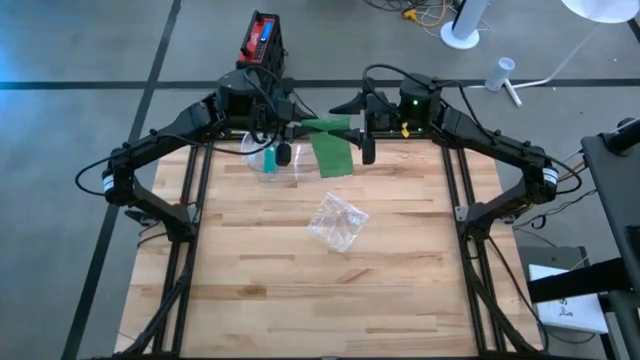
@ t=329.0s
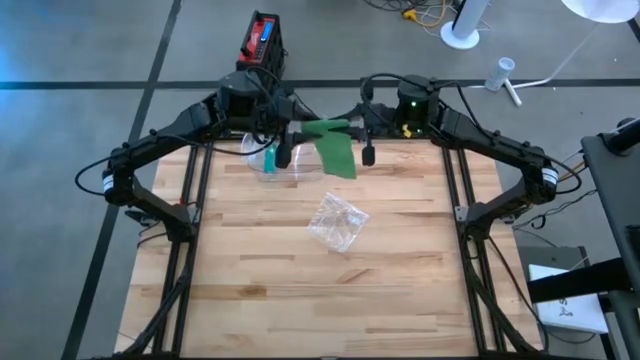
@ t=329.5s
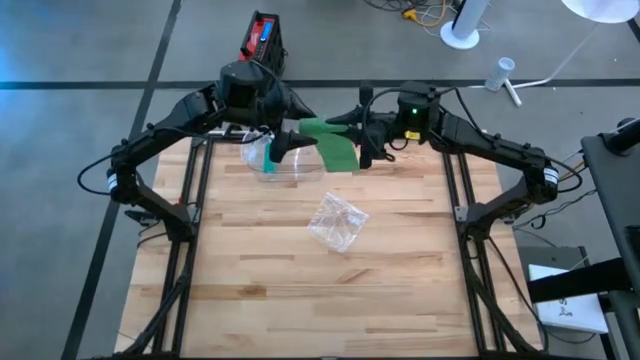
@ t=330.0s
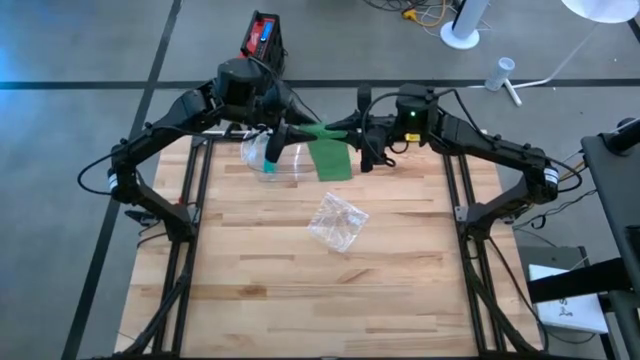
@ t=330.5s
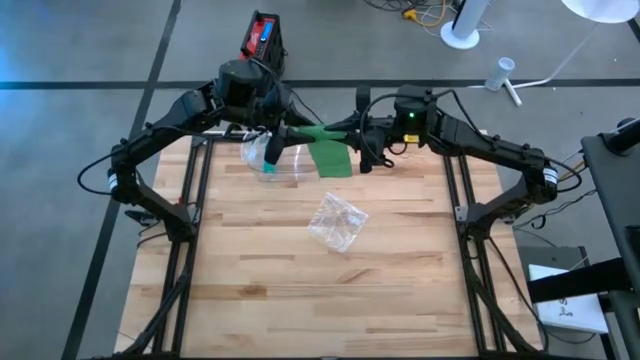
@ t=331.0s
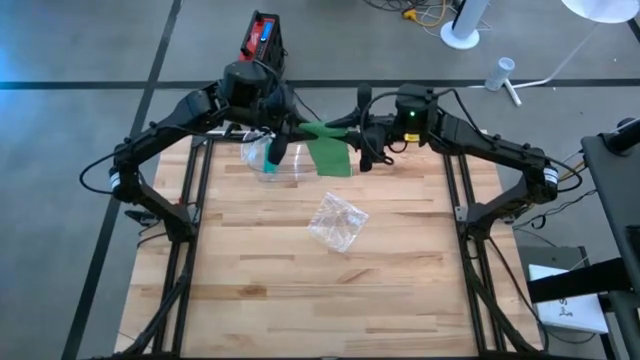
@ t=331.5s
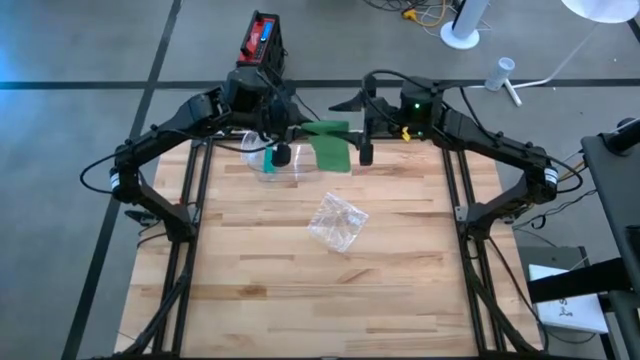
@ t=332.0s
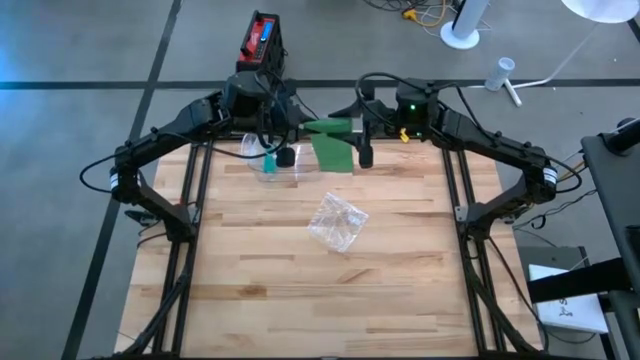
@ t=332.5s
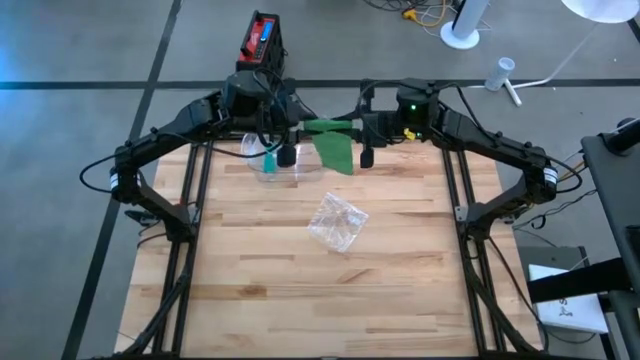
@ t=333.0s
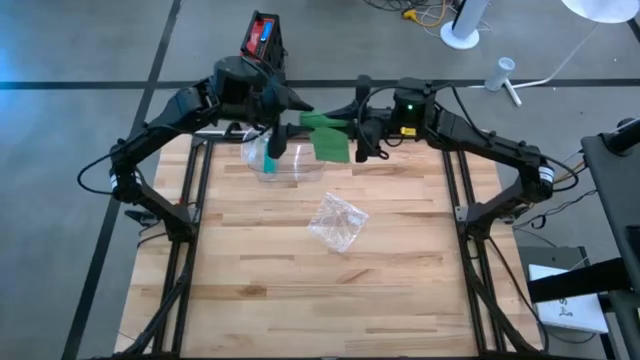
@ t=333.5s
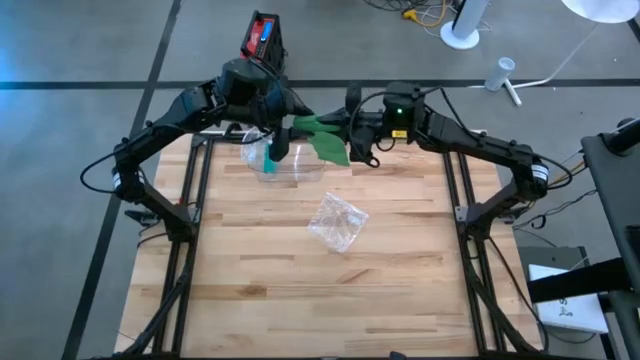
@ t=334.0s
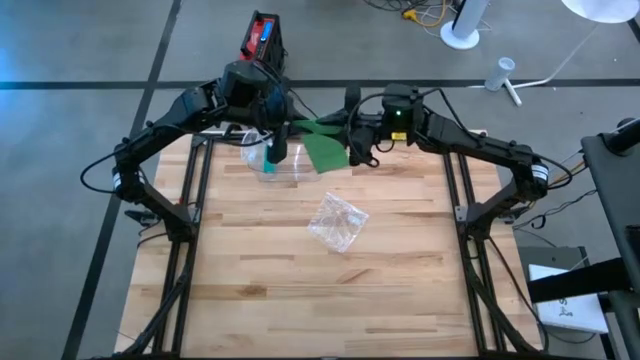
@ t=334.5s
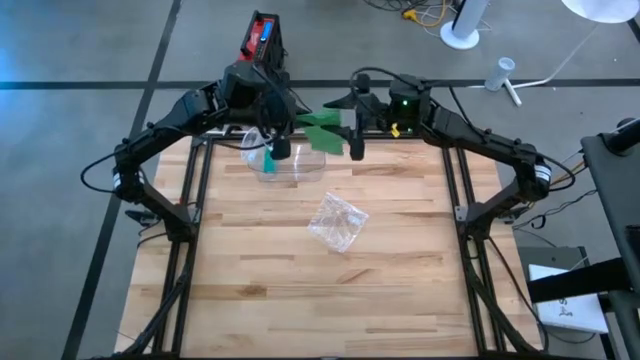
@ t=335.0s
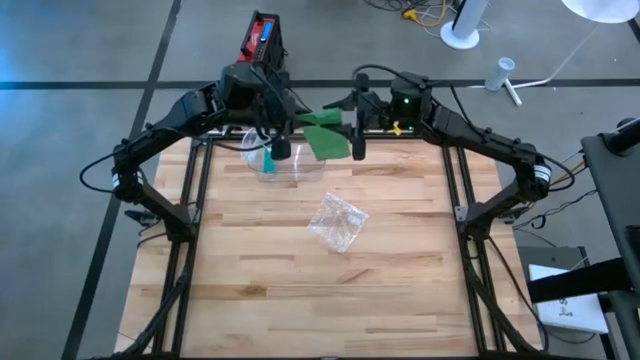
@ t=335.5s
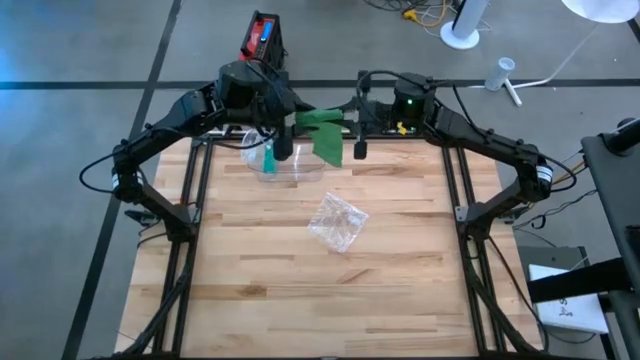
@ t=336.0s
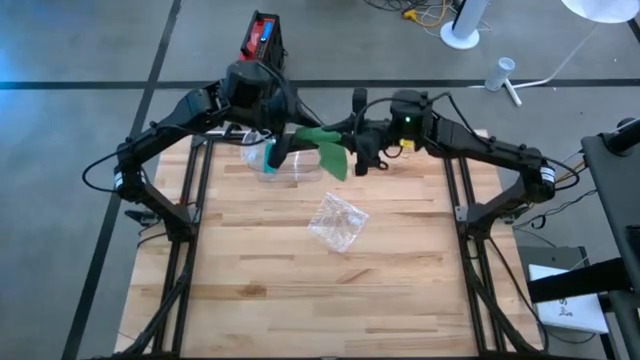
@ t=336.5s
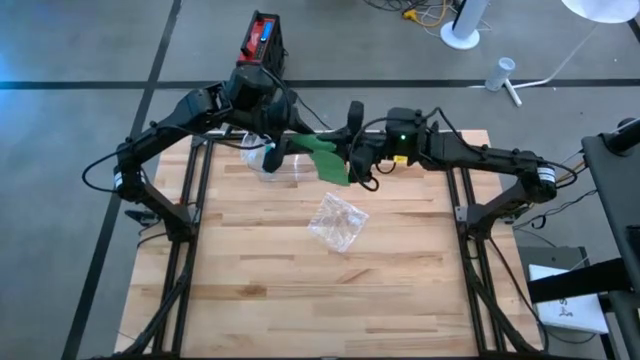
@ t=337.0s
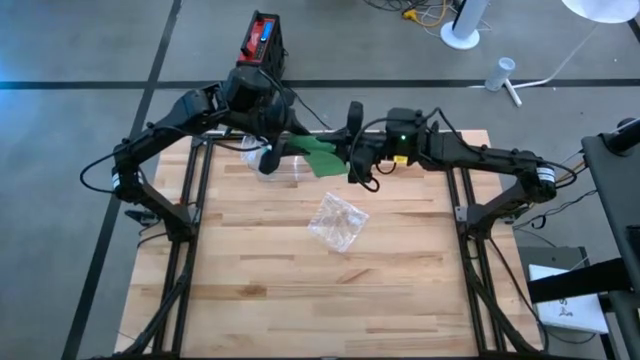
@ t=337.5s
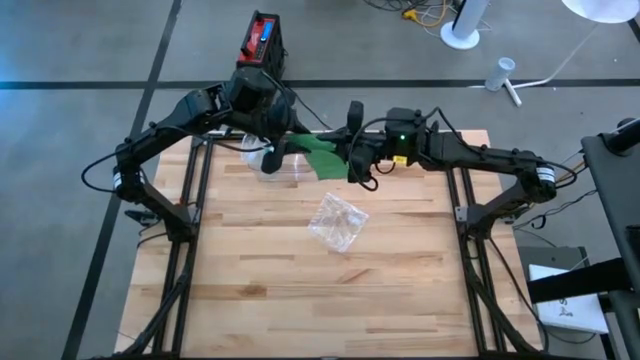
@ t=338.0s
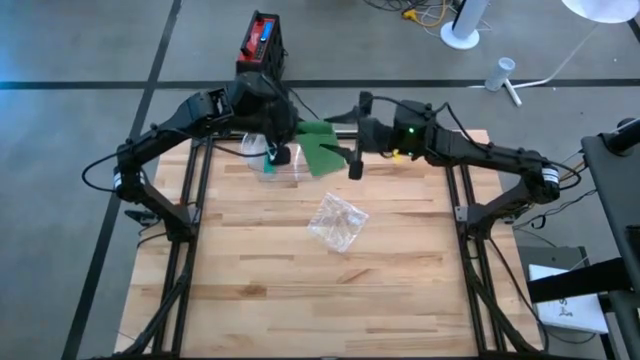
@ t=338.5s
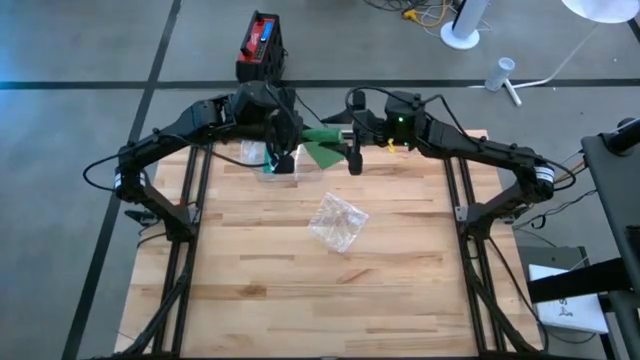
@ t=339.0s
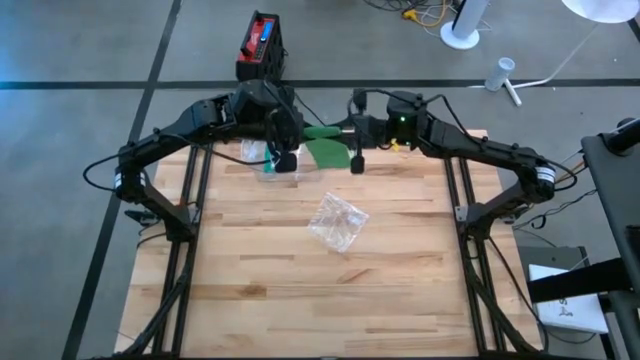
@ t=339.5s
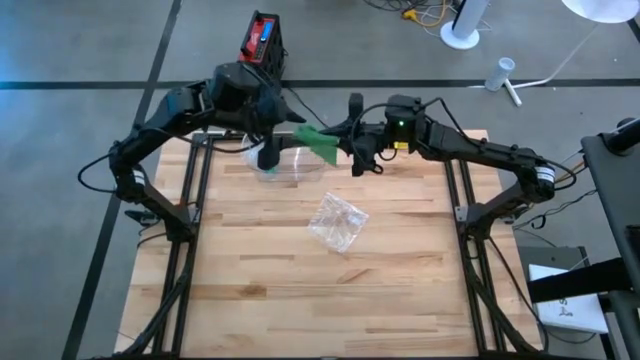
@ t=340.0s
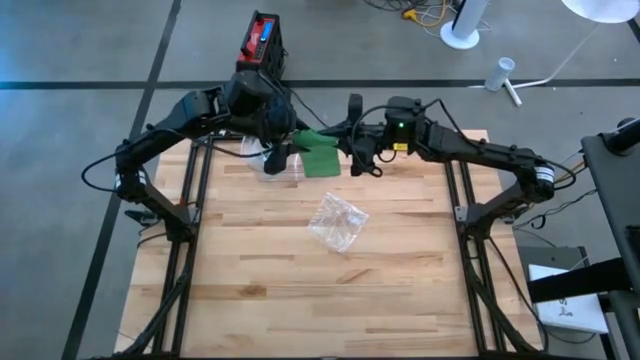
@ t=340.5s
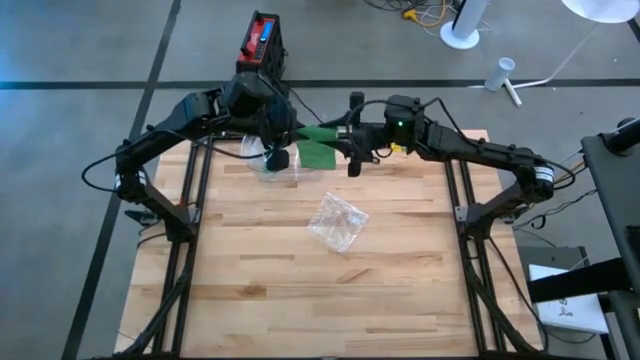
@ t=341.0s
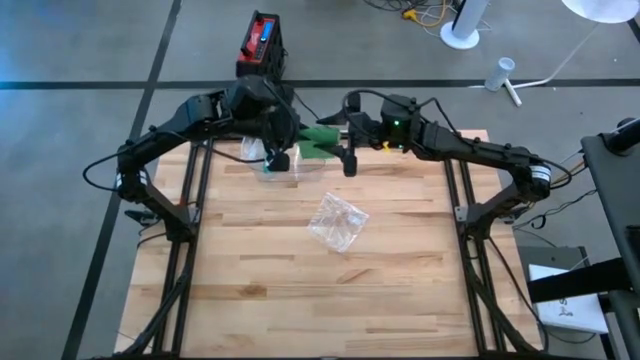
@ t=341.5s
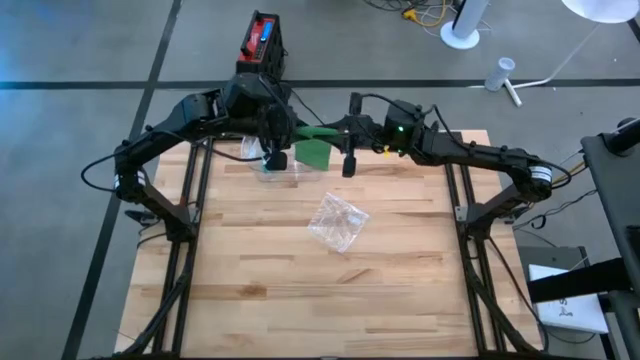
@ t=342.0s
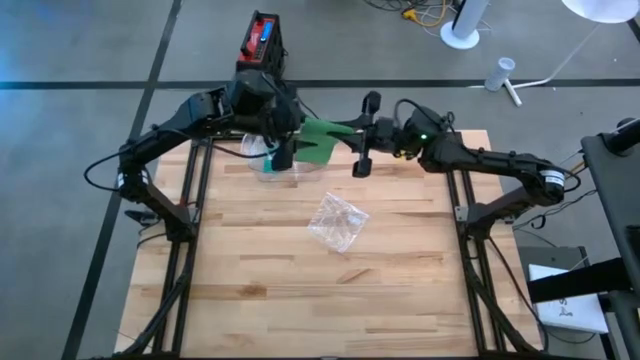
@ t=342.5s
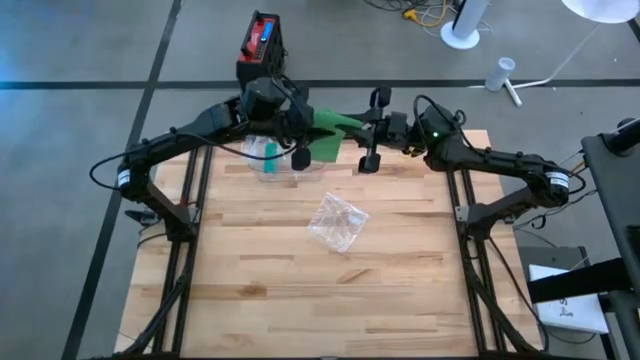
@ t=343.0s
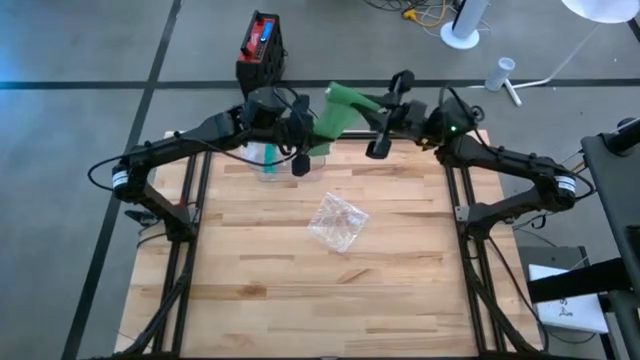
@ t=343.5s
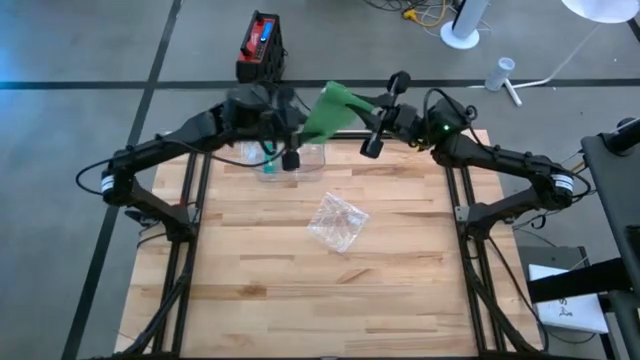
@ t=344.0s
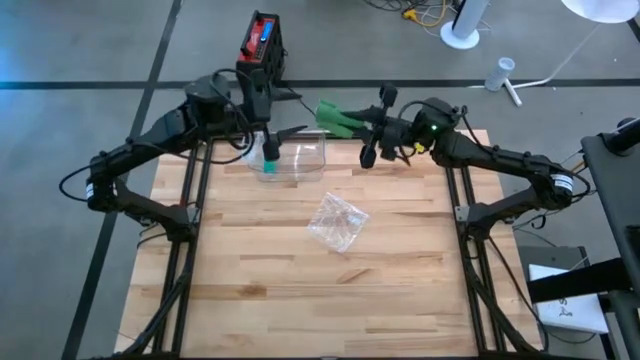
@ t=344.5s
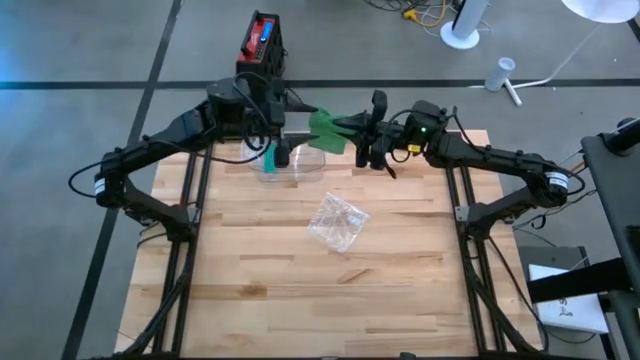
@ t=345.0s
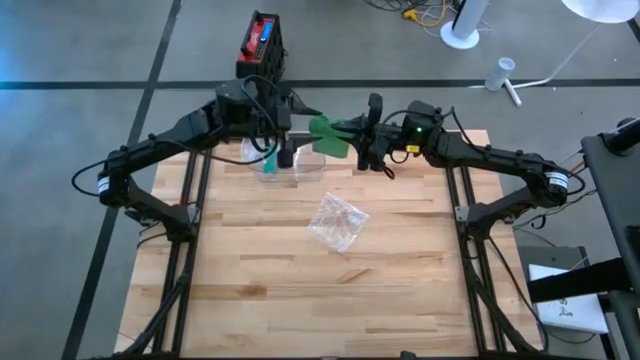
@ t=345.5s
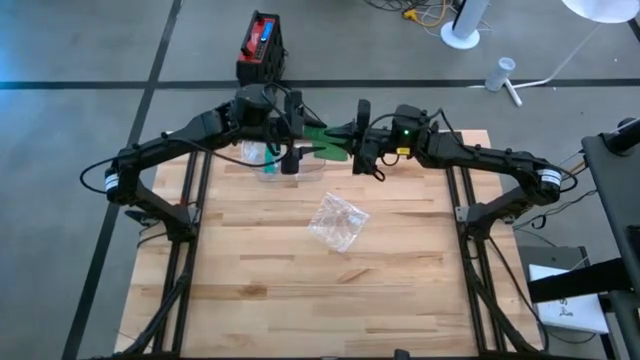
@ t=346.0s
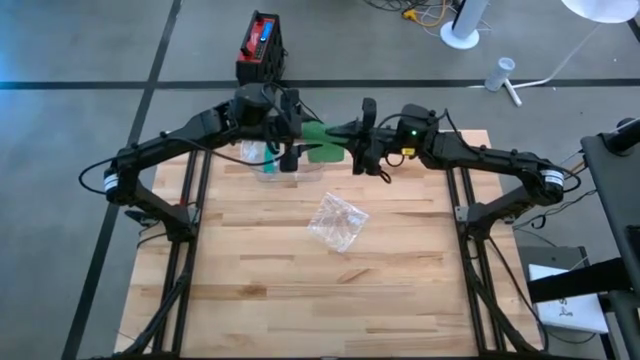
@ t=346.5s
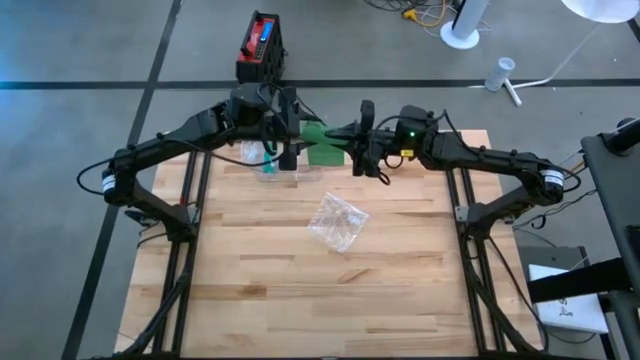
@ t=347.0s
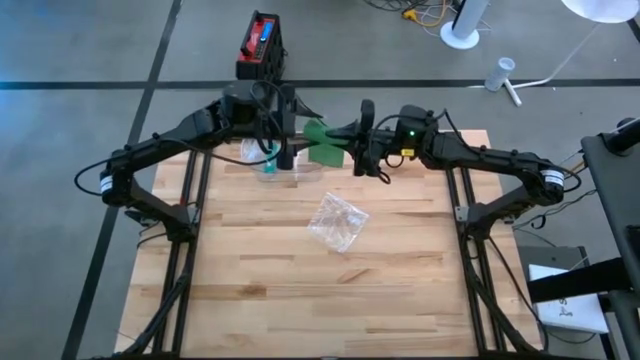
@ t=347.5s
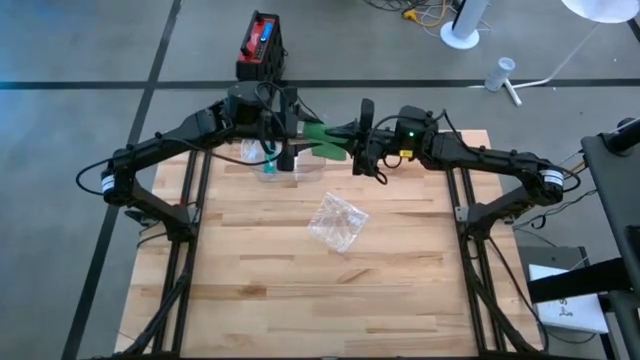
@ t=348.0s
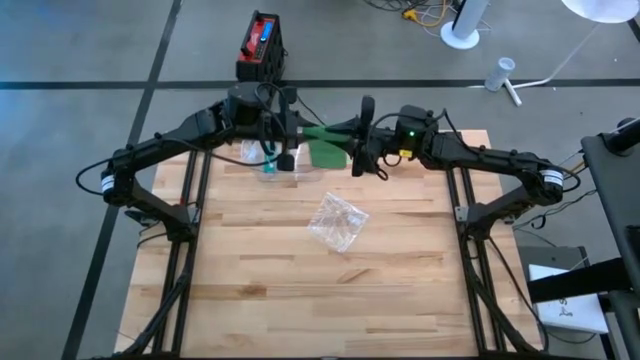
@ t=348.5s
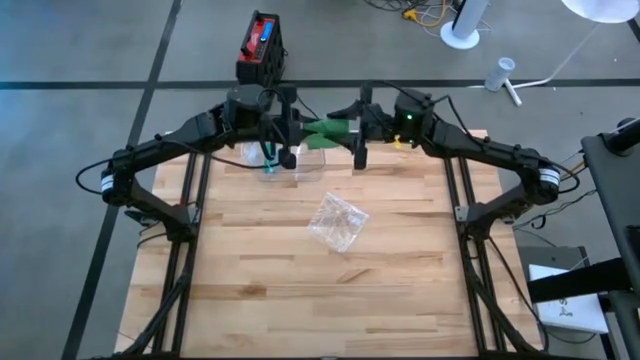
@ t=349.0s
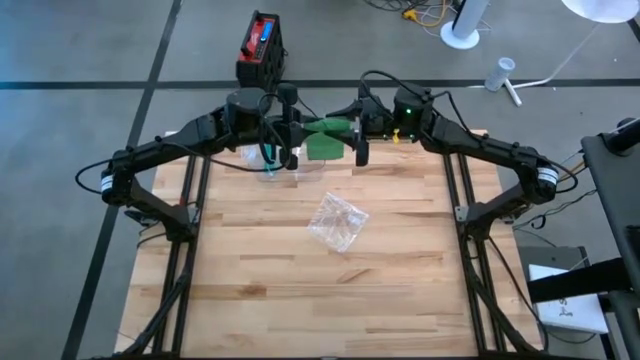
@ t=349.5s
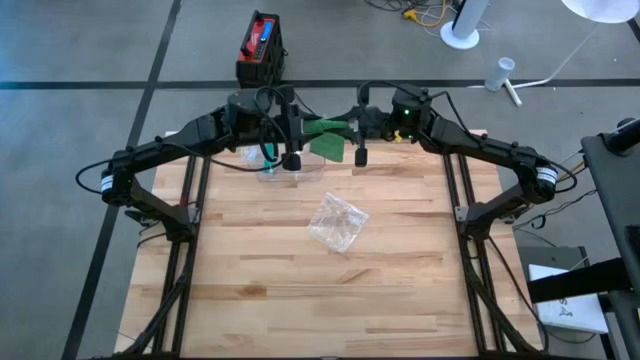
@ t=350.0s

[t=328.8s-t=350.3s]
Task: Roll bandage
Roll the green bandage
